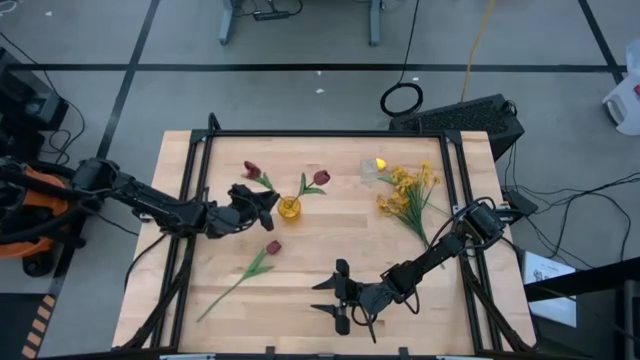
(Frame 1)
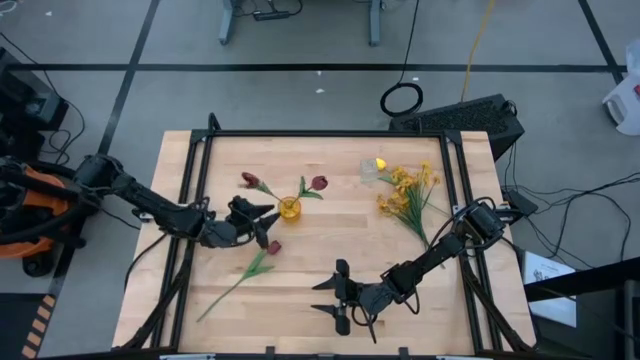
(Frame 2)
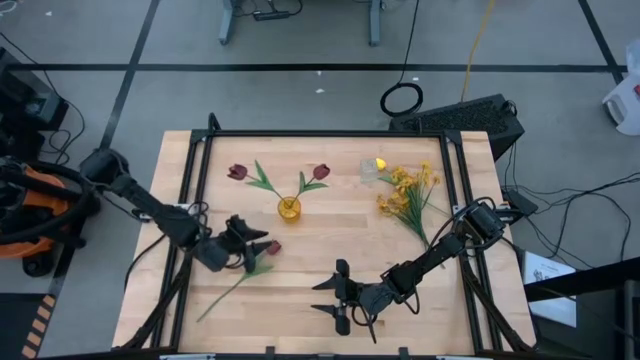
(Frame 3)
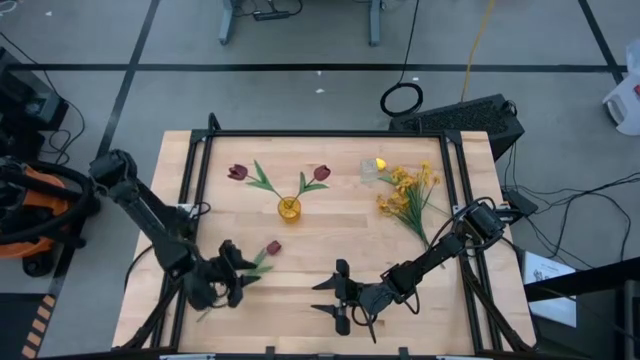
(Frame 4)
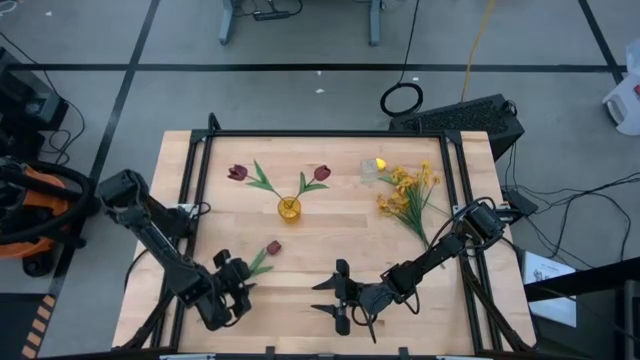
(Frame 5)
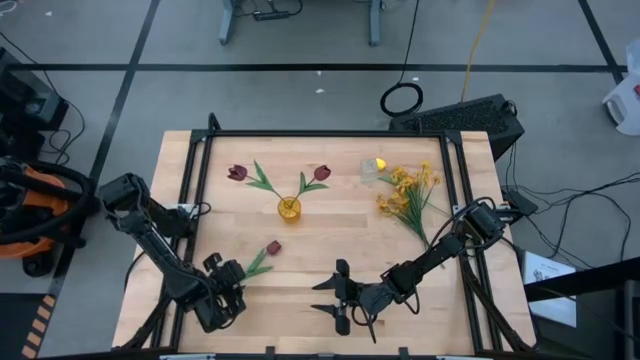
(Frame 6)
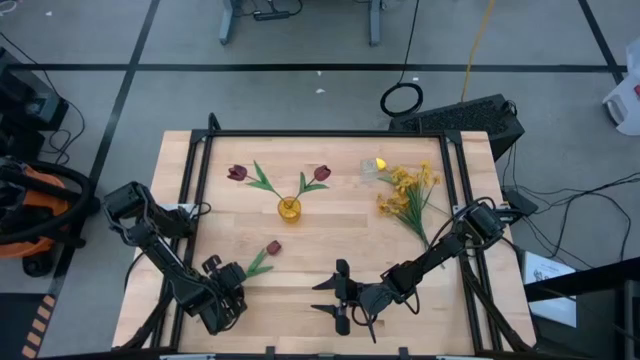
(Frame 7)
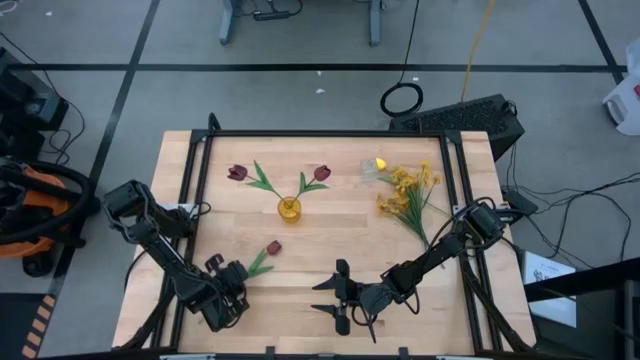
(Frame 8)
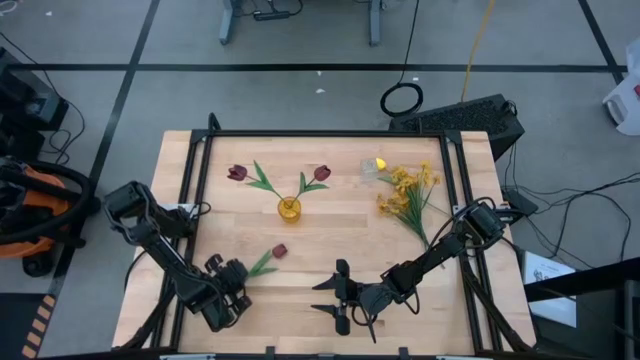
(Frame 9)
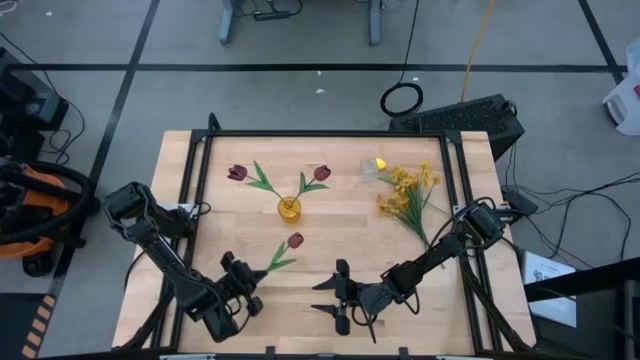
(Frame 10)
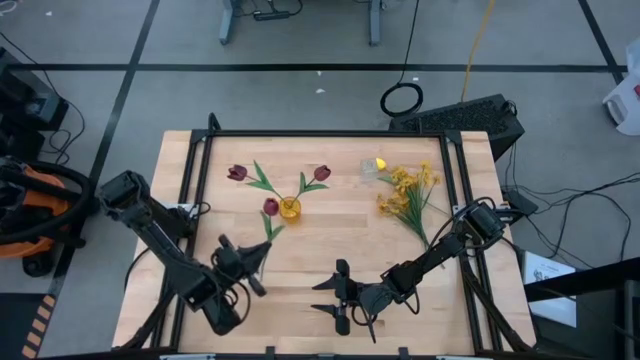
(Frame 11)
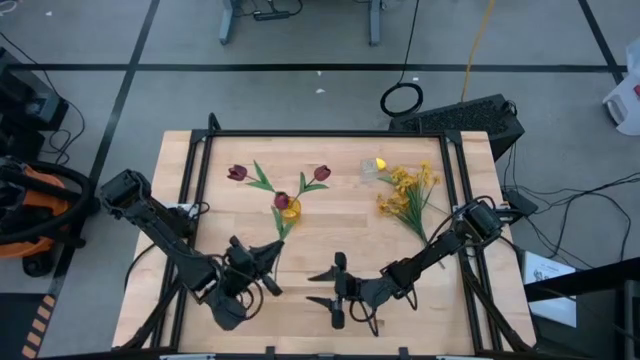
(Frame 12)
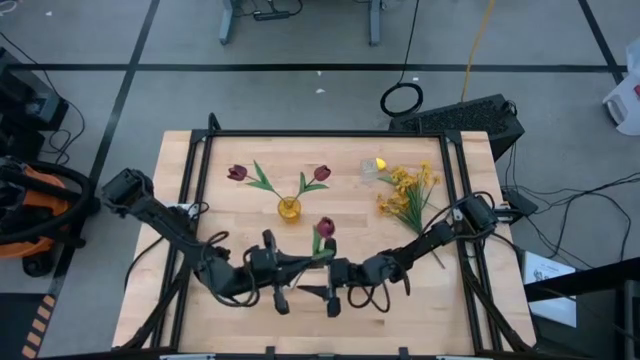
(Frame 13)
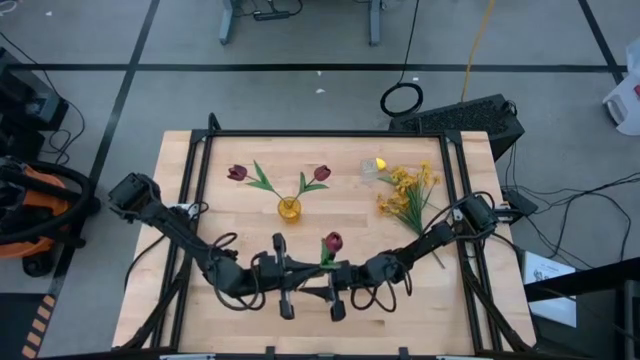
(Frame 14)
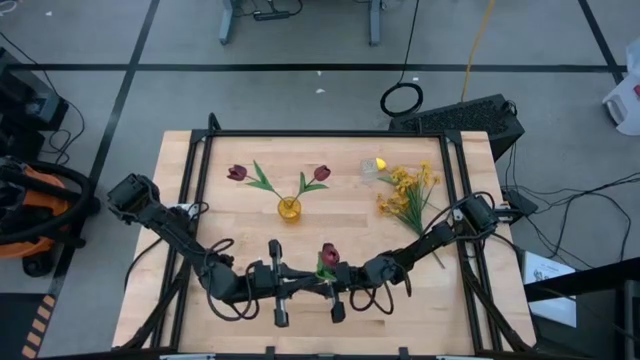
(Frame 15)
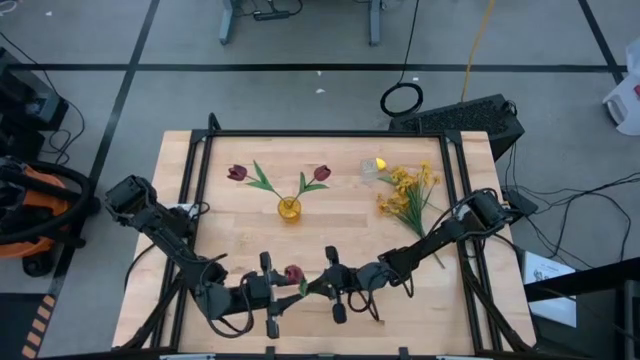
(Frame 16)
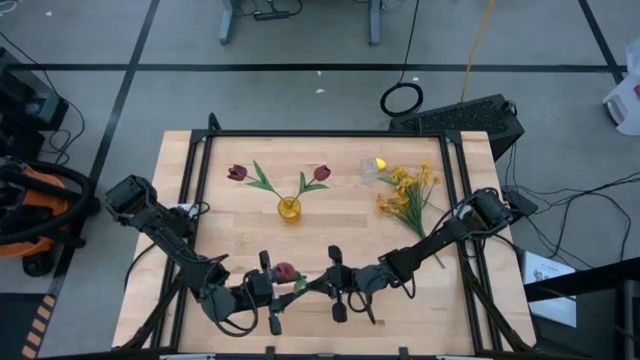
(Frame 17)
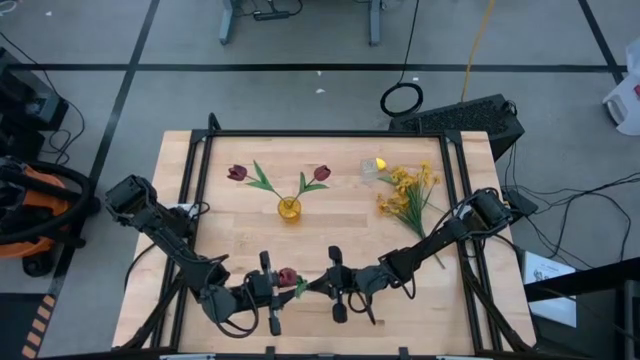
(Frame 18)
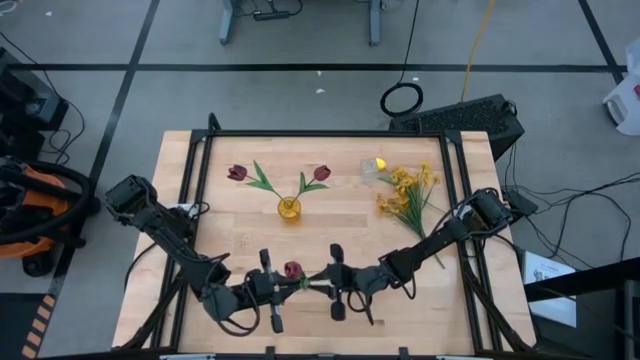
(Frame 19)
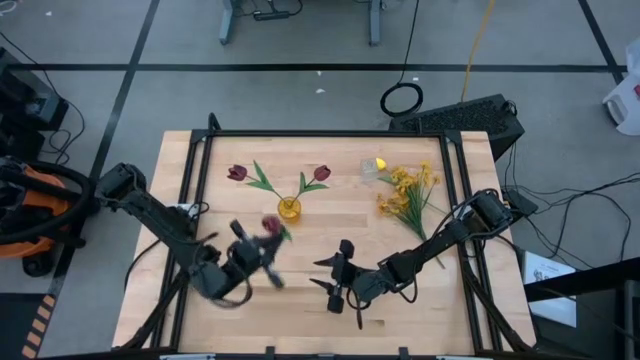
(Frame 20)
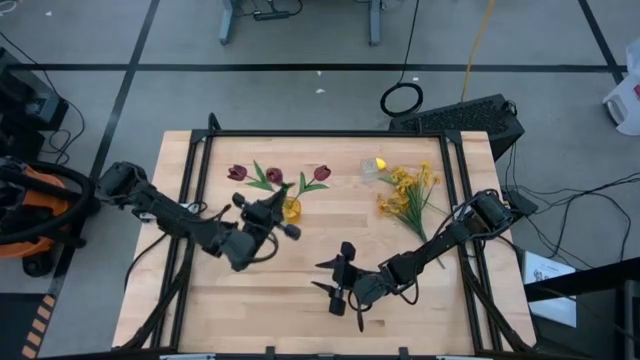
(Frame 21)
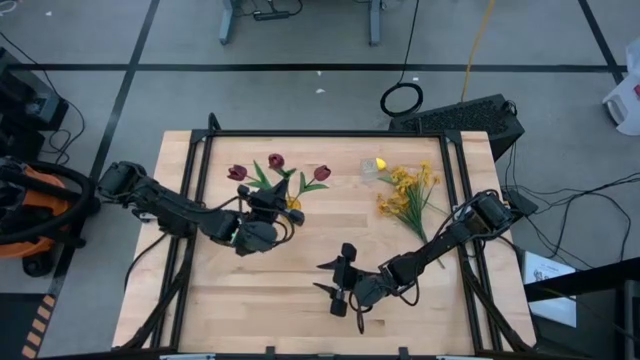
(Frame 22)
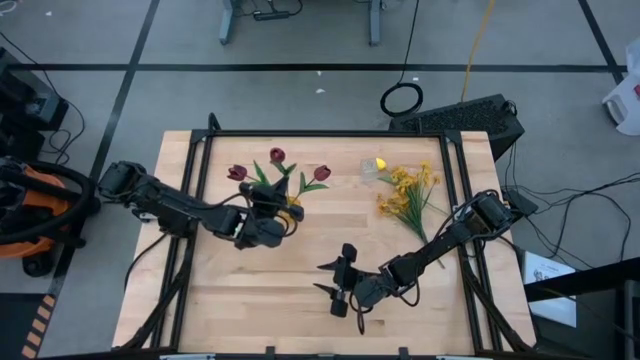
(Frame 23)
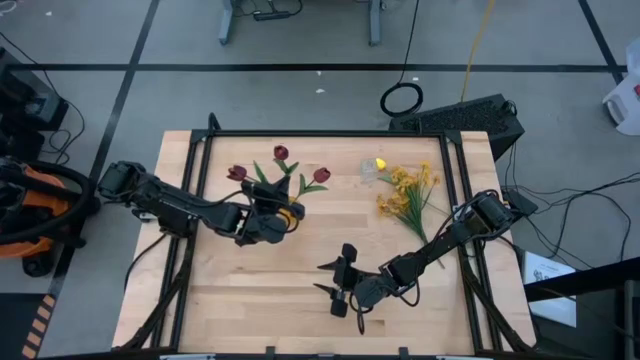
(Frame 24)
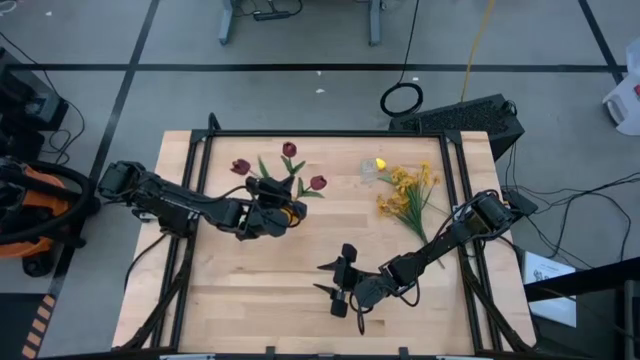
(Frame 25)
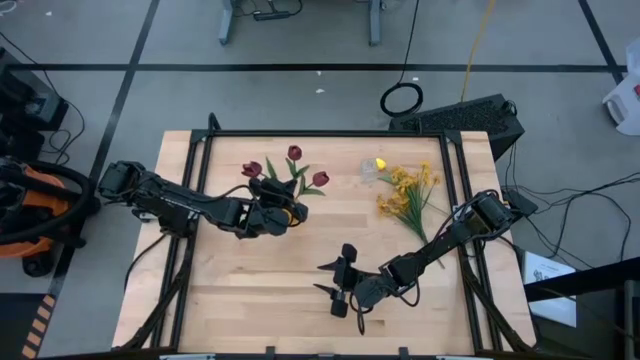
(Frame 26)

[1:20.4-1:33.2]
Task: Sort flowers into vase by color
Put the violet tulip into the yellow vase

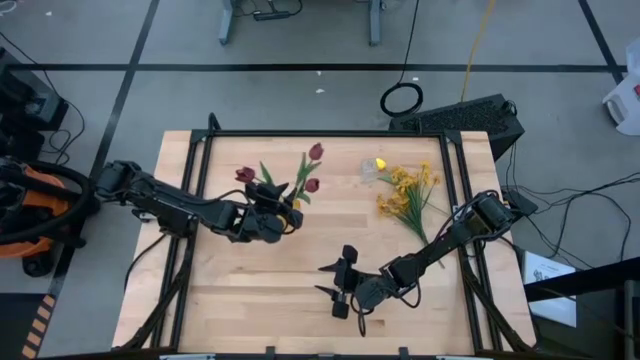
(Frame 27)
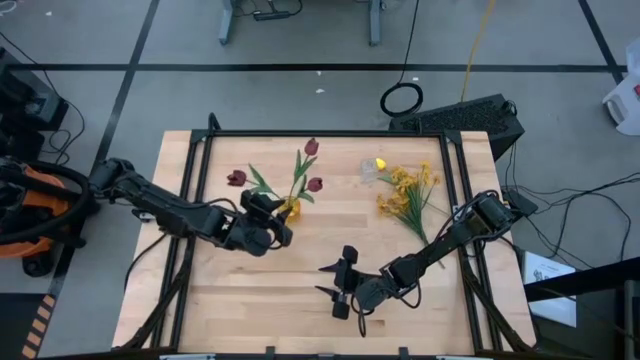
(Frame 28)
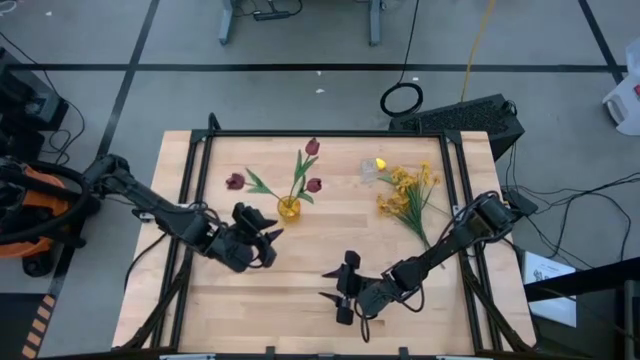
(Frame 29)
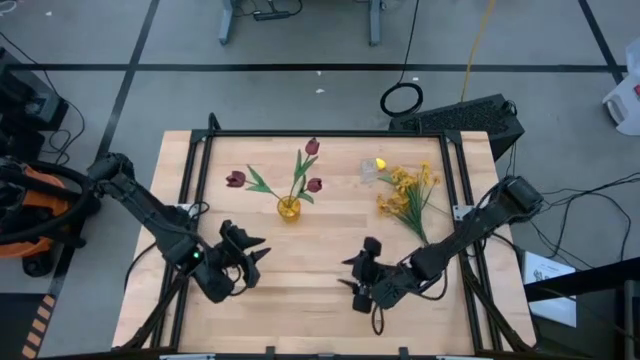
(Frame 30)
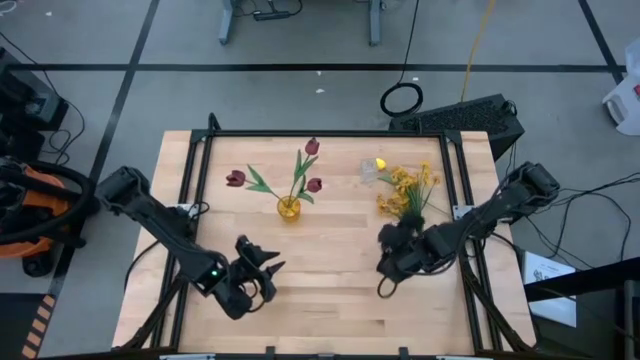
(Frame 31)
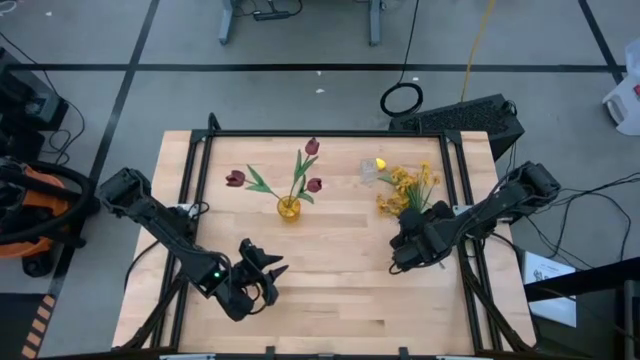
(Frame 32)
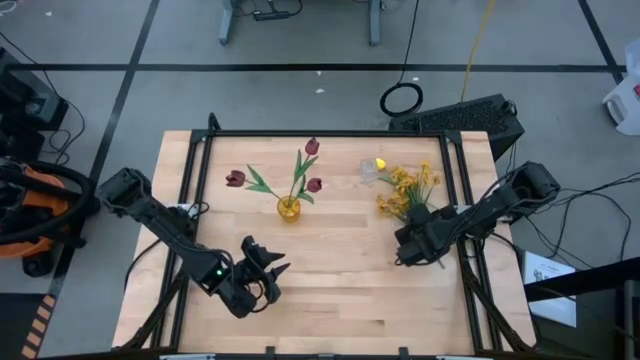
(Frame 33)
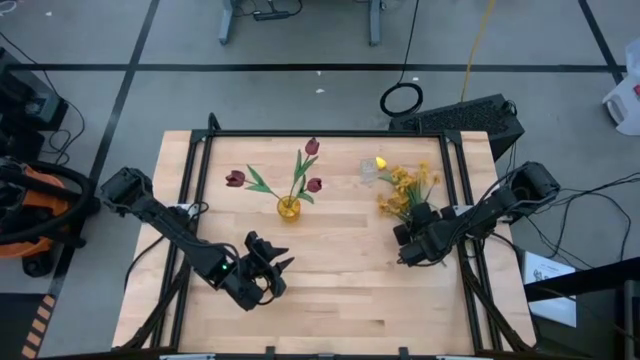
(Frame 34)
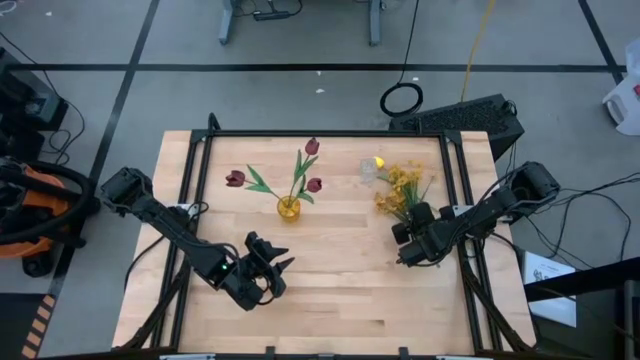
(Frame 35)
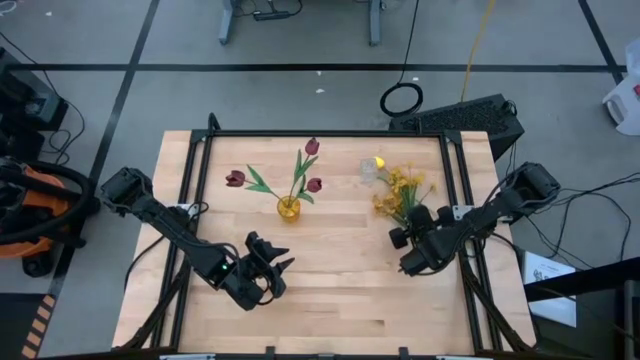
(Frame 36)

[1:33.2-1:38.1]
Put the yellow flowers into the transparent vase

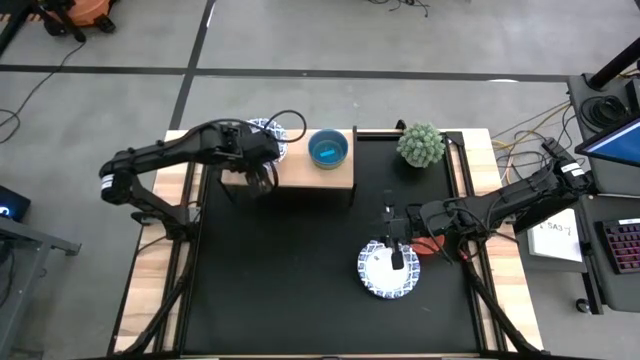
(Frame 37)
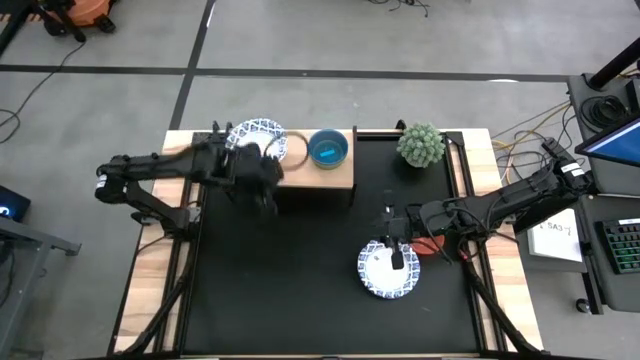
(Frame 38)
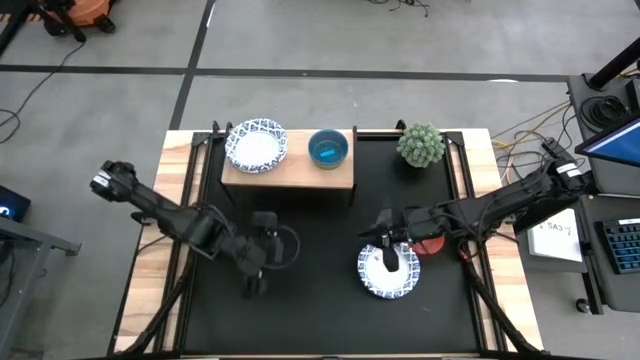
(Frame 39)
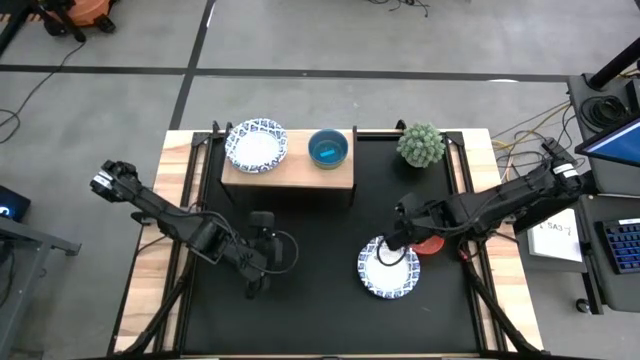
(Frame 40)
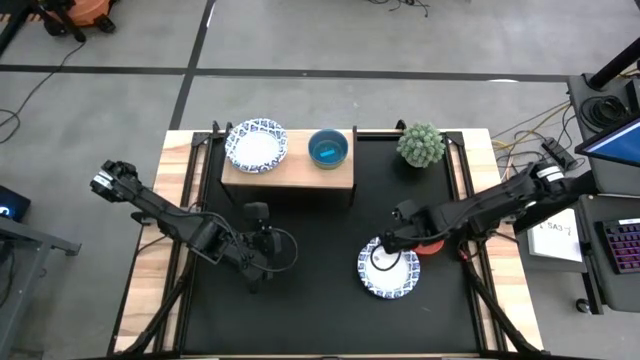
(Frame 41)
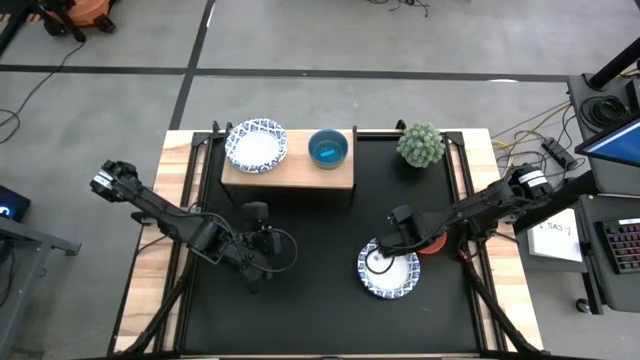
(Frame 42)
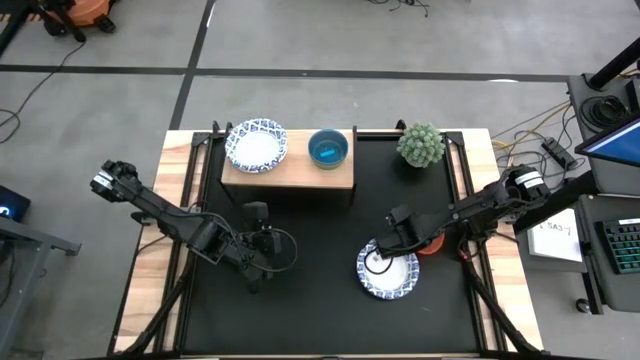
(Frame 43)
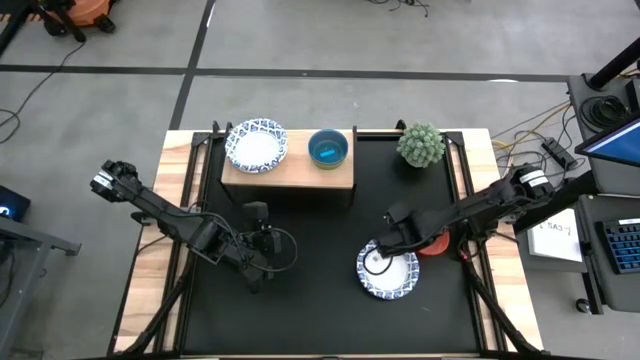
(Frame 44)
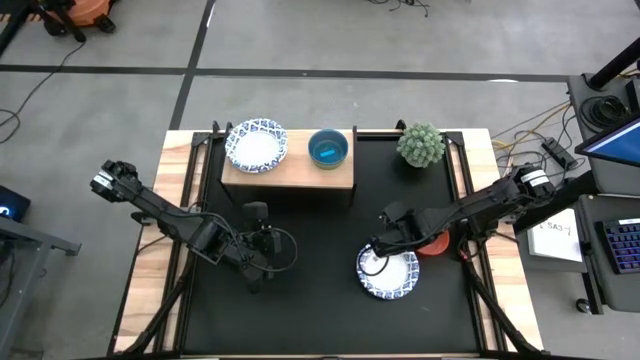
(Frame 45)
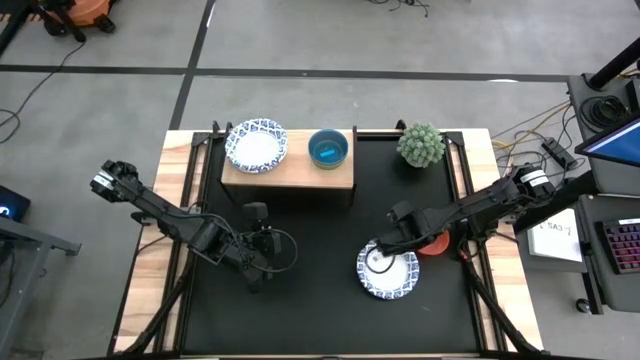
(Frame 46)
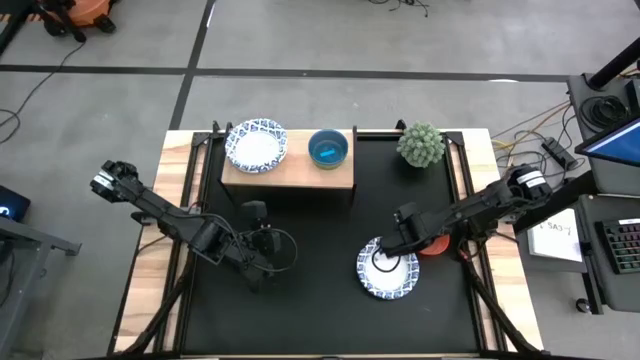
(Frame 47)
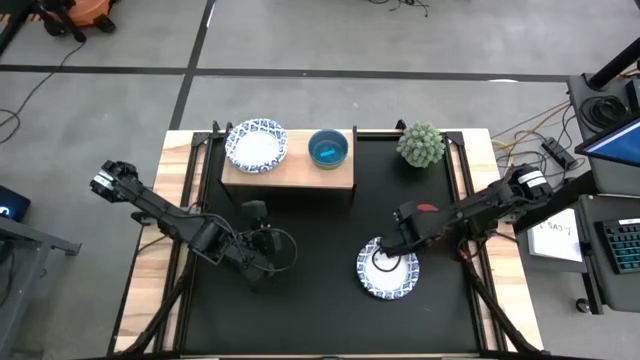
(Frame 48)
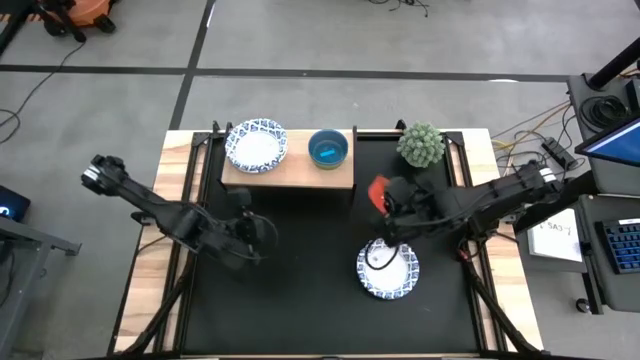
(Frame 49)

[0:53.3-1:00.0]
Task: Place and stack bowls onto a shelf
Stack the orange bowl on top of the blue bowl on the shelf
